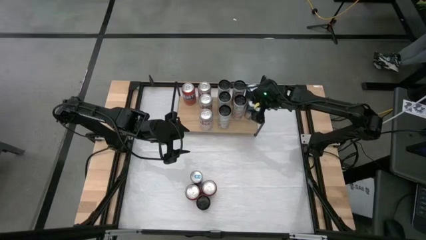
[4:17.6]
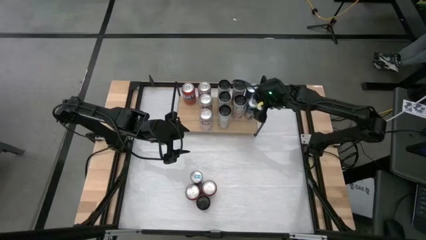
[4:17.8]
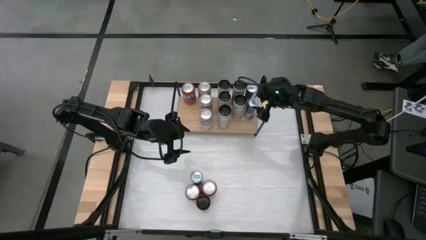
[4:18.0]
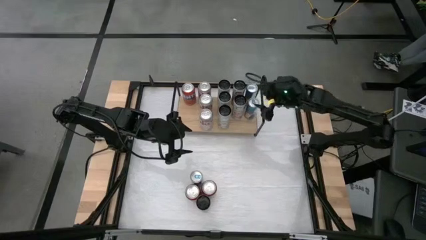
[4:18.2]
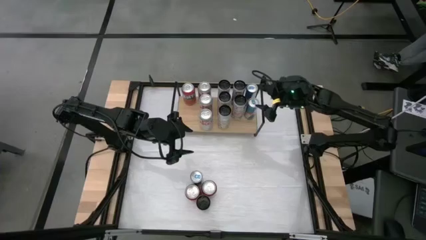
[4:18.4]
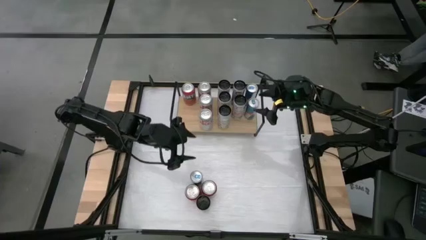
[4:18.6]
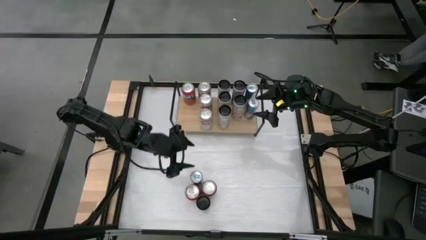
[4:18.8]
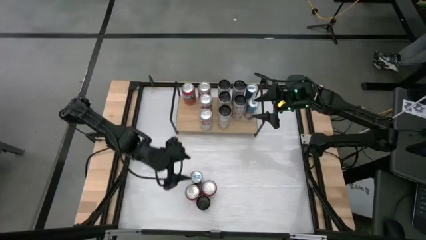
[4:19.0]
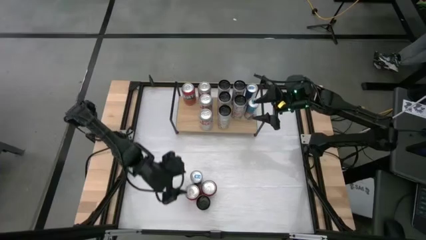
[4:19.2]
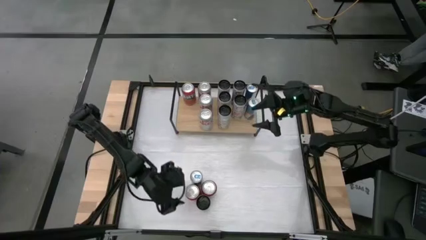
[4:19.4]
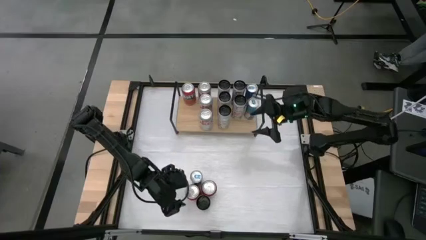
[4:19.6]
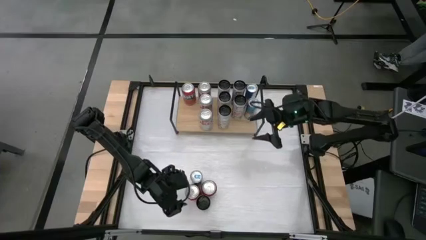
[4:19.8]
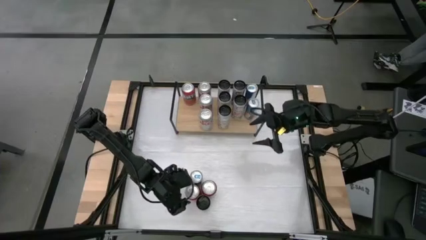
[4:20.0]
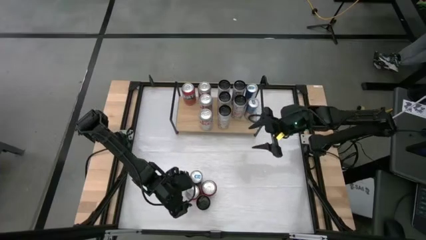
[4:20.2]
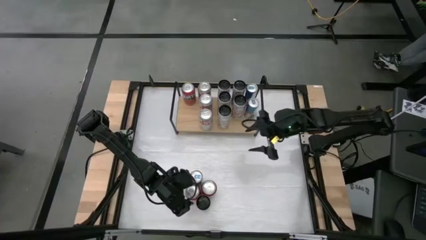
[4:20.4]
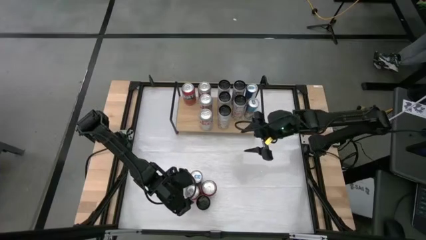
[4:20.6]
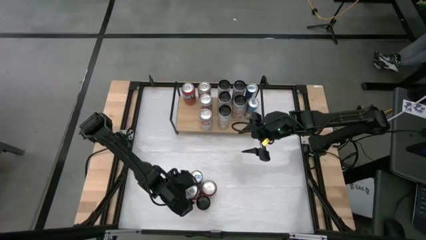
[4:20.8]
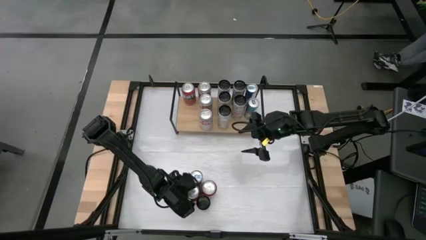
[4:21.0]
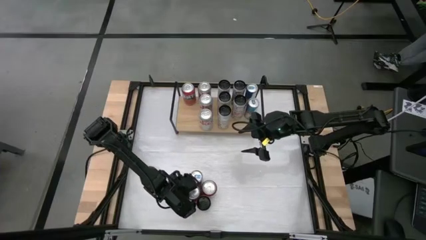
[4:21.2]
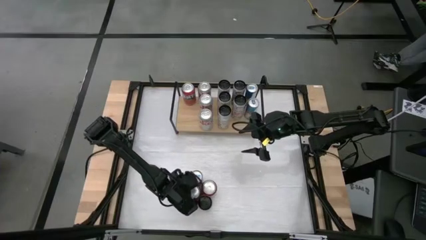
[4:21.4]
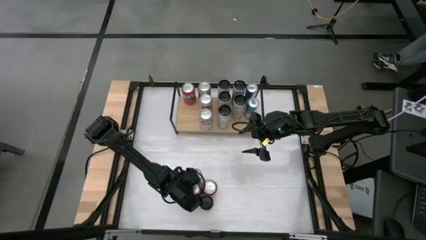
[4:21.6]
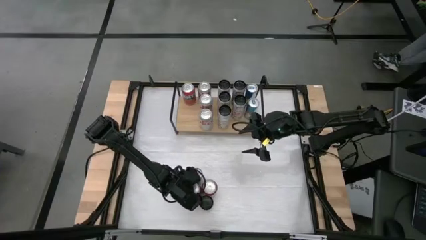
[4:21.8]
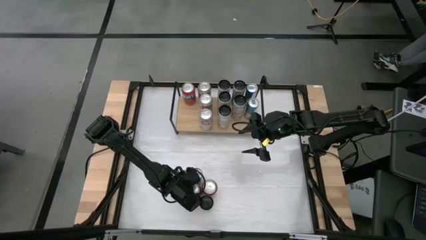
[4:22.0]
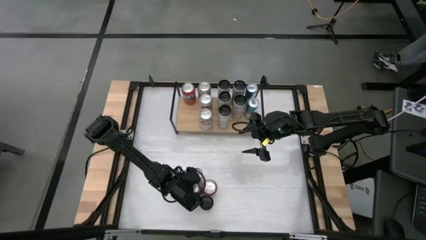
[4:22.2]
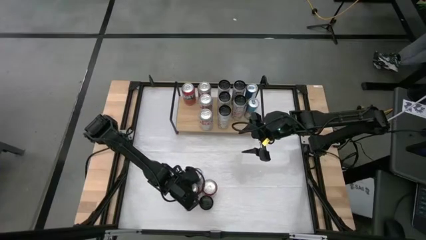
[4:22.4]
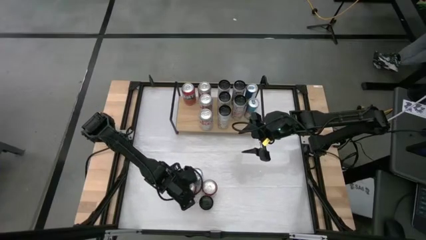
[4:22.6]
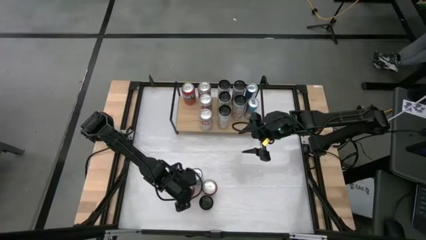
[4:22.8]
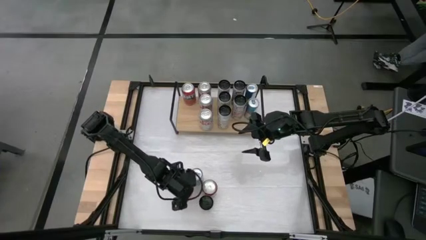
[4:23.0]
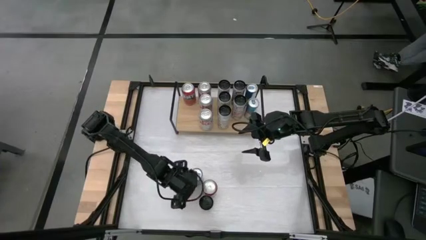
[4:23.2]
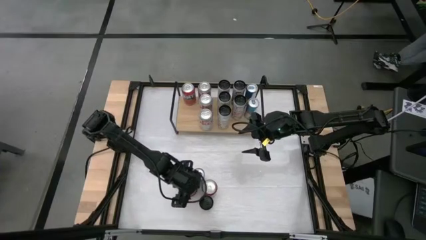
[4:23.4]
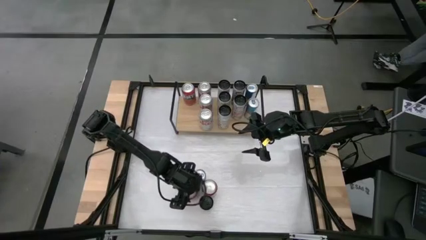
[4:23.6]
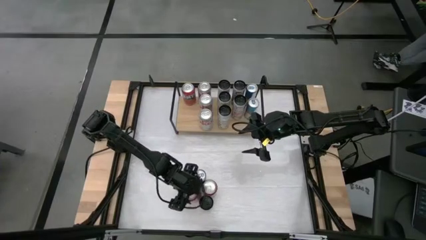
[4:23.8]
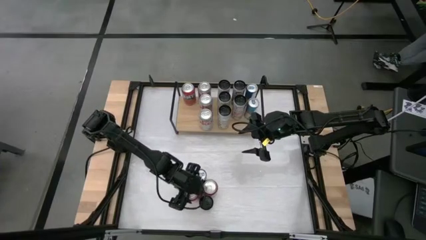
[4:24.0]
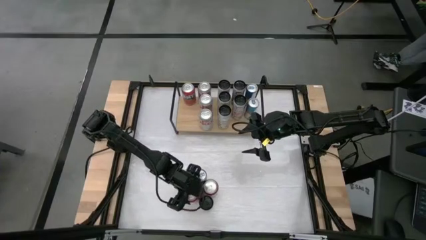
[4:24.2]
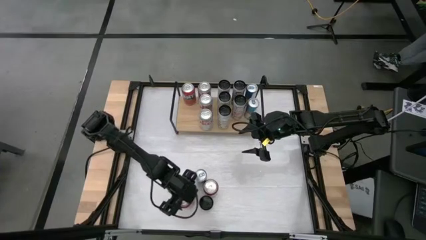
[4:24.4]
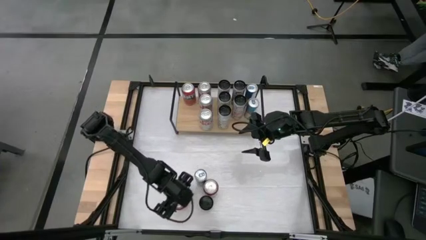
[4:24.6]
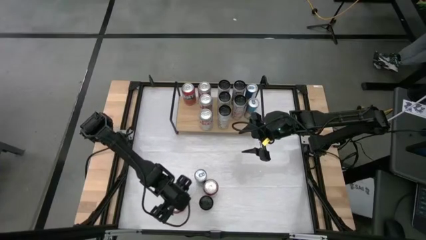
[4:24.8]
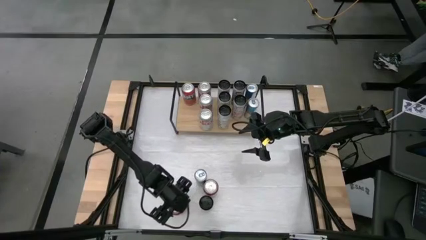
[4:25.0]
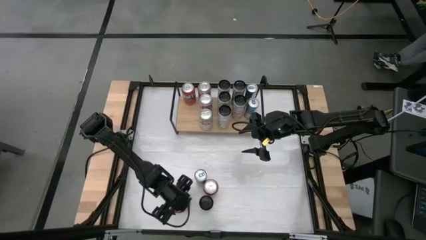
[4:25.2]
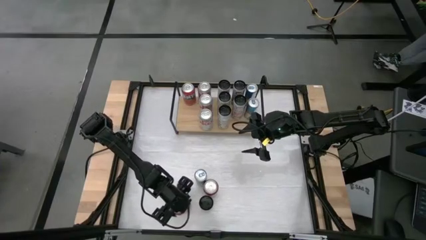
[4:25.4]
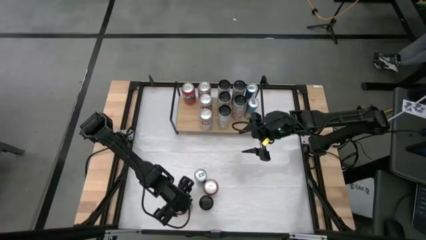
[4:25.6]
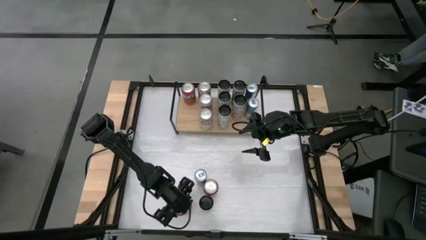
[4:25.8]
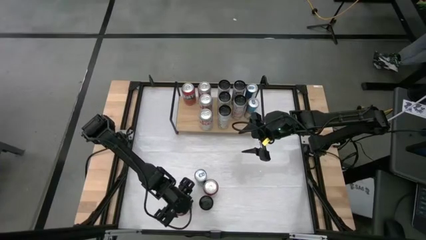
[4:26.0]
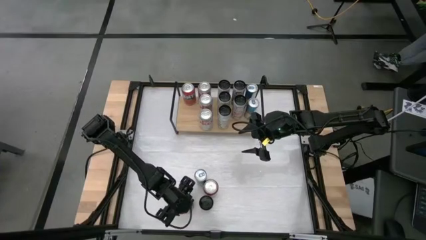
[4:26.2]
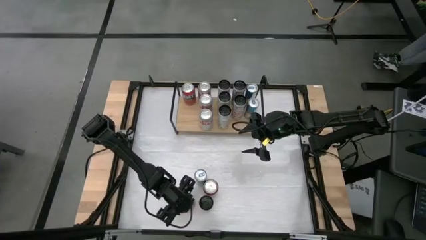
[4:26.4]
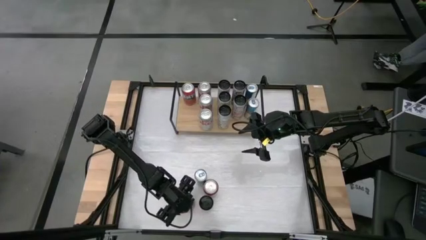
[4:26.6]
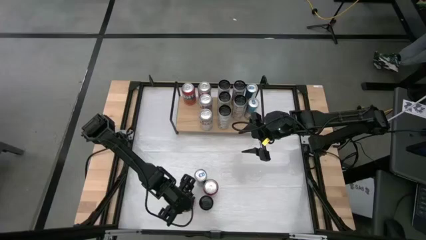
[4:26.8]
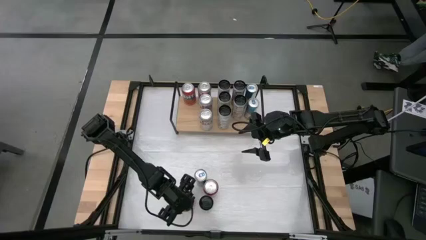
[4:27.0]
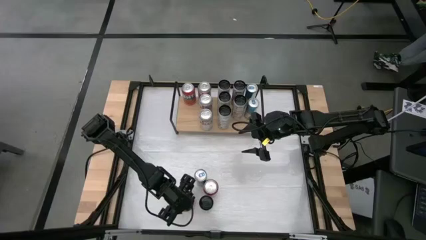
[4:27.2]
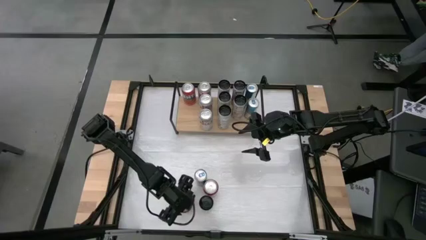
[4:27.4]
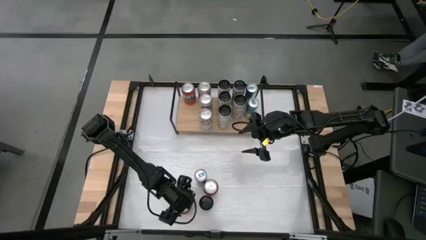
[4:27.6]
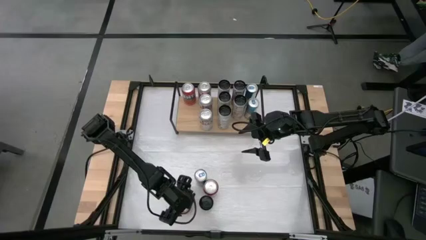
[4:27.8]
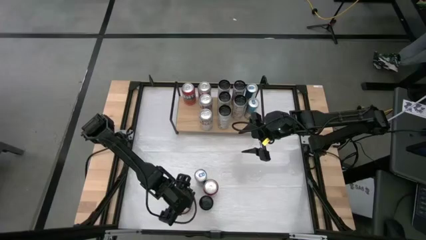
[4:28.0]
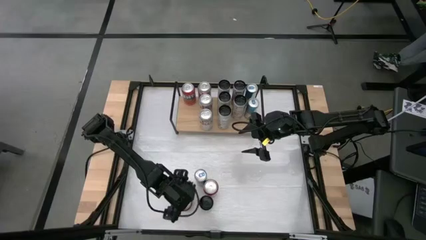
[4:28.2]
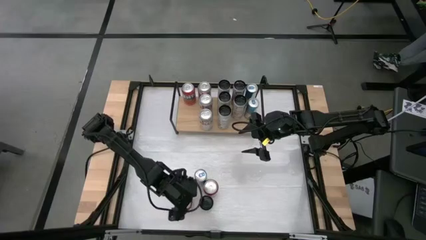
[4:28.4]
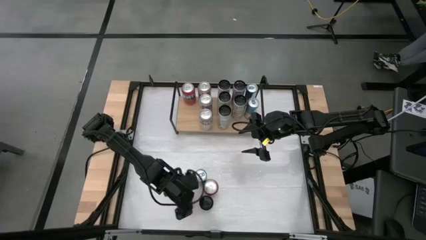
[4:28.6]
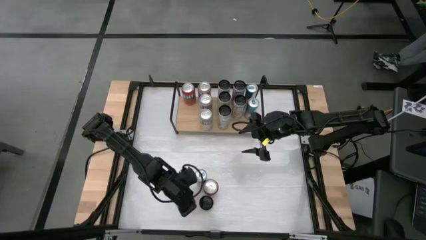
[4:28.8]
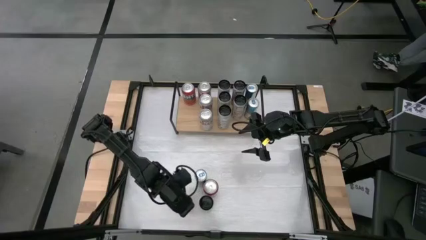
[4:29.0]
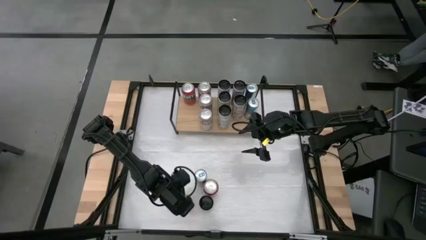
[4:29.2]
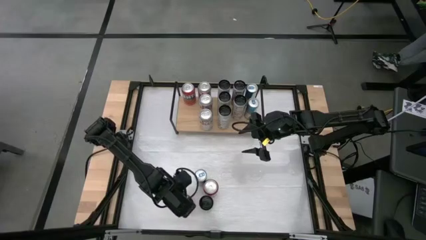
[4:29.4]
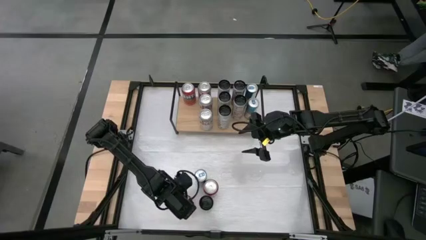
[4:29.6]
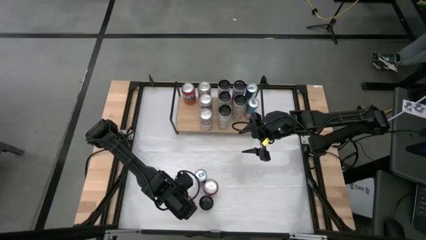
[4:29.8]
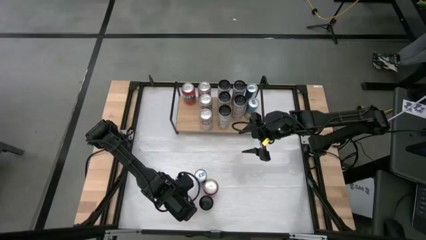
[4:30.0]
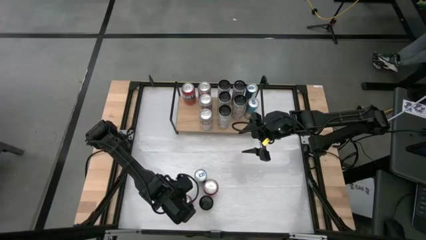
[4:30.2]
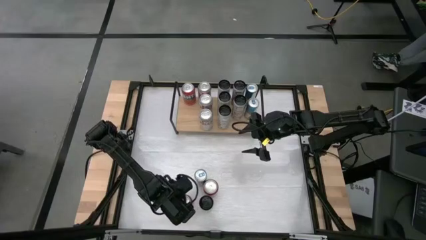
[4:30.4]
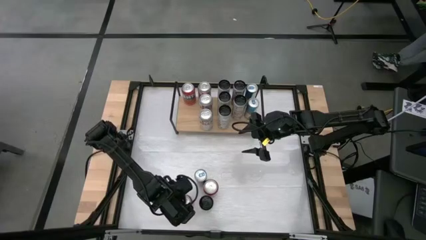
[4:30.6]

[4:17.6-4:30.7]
Task: Place canned beverage on shelf
Put the red soda can onto the shelf aligned with the other red soda can

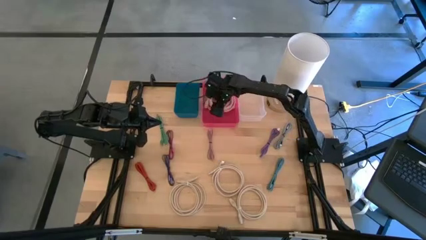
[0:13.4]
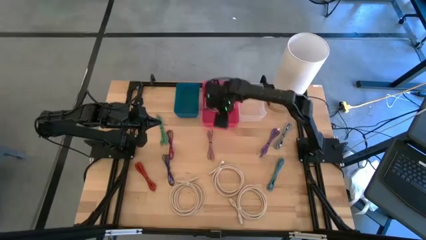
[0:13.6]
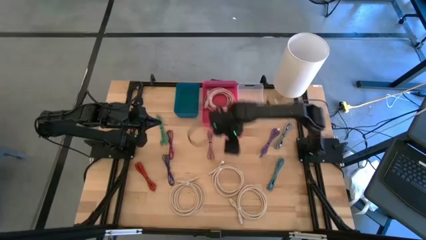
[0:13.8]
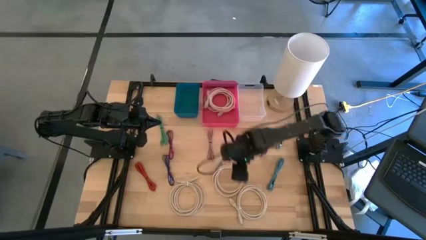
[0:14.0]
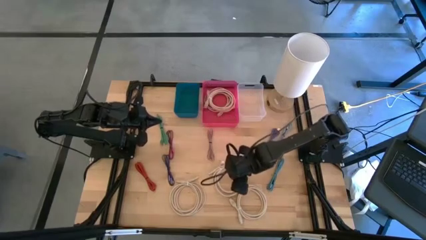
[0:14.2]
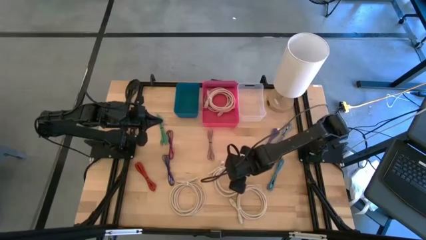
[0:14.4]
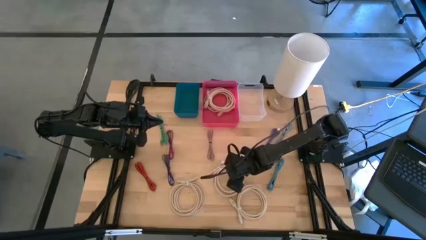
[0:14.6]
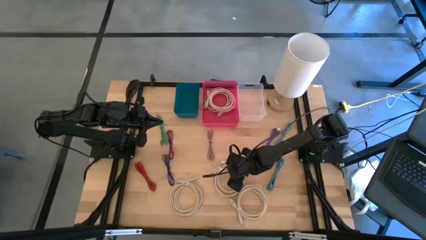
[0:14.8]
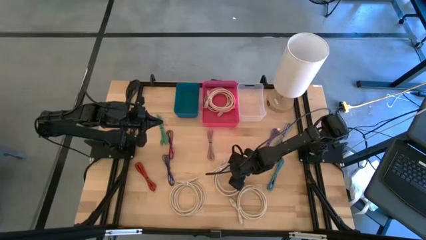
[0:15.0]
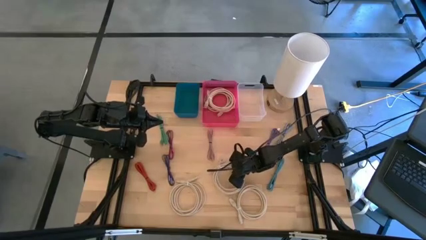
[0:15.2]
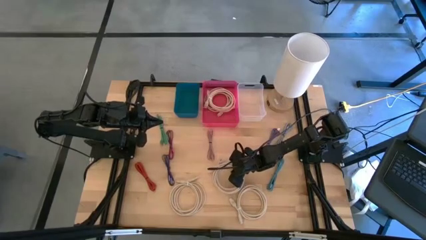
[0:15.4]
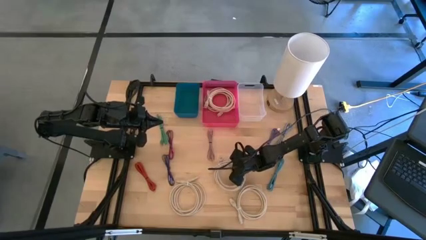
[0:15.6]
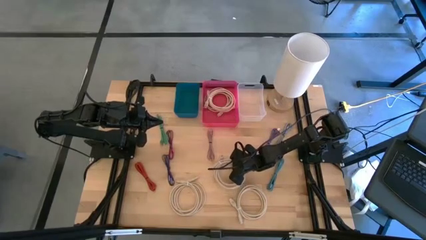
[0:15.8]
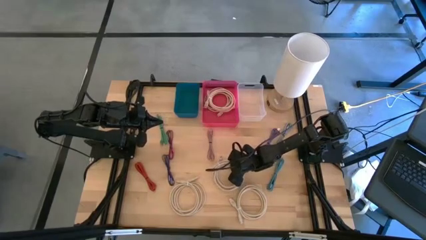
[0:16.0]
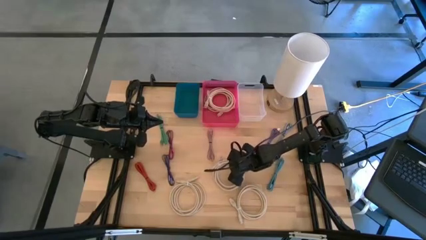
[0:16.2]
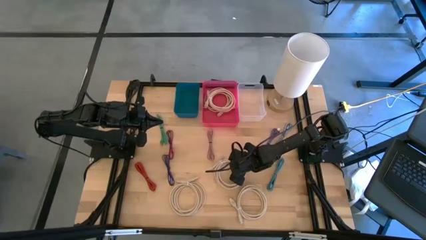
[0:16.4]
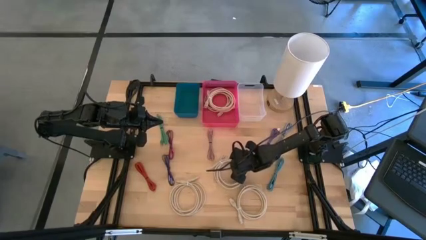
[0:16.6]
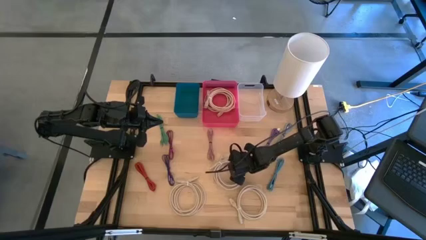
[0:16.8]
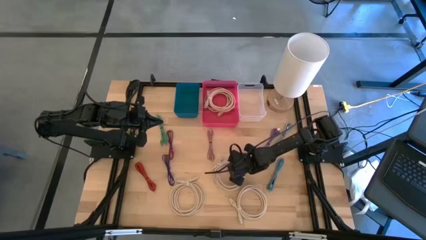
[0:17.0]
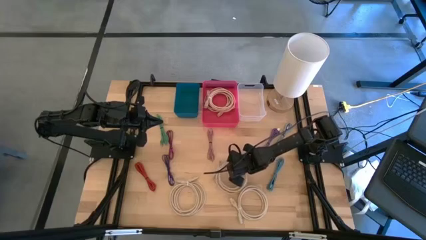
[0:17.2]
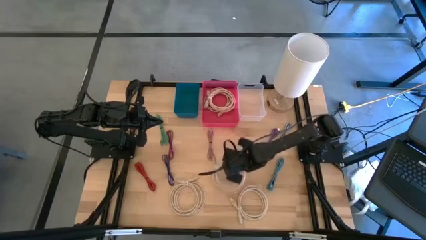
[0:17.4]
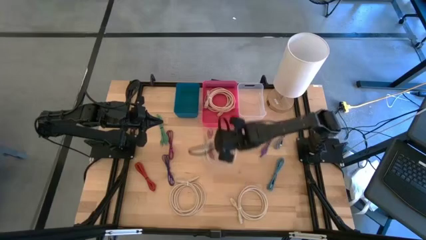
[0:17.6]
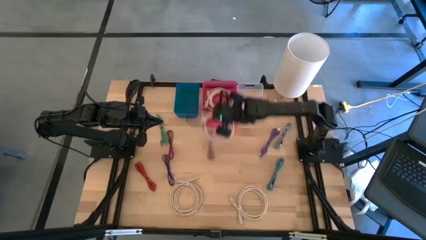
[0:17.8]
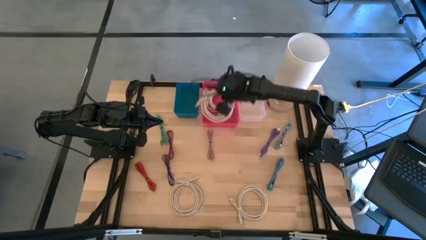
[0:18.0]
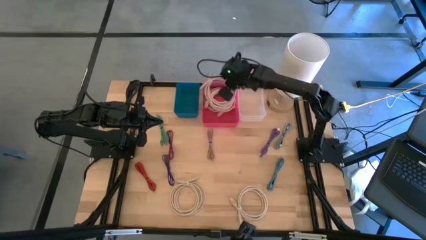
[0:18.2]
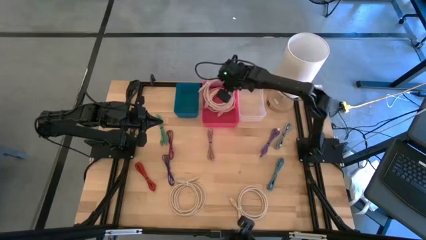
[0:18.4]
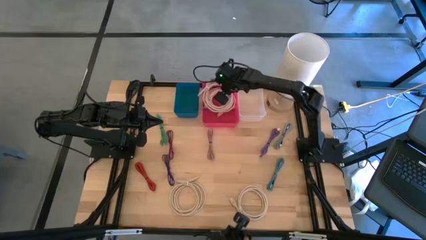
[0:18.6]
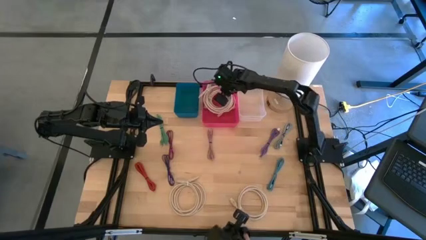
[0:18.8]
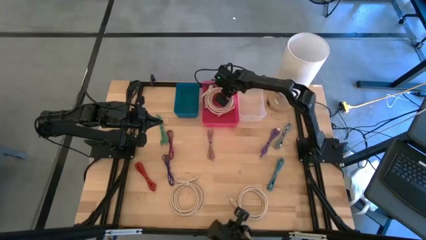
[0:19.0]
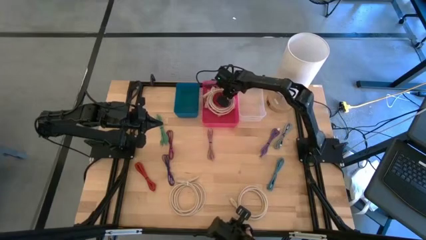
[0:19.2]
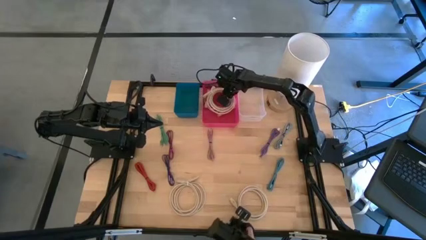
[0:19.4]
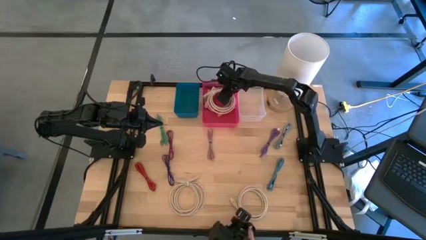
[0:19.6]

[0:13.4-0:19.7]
Task: Pick & Place USB Port
Put the light brown HDMI cable into the pink bin
